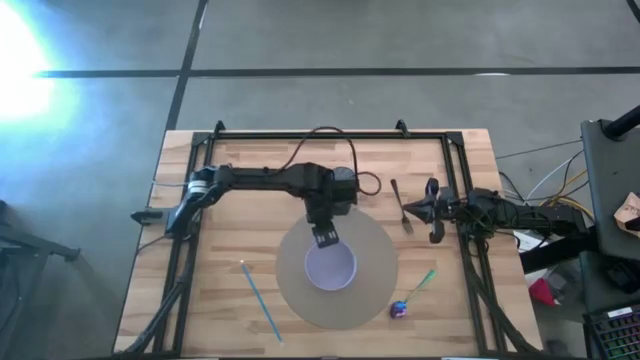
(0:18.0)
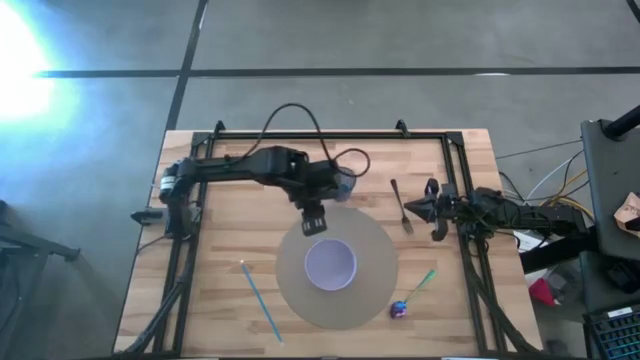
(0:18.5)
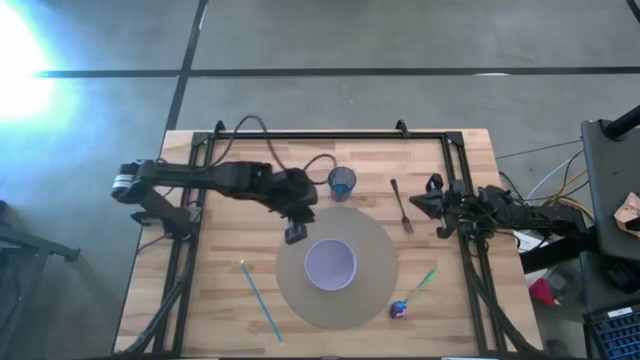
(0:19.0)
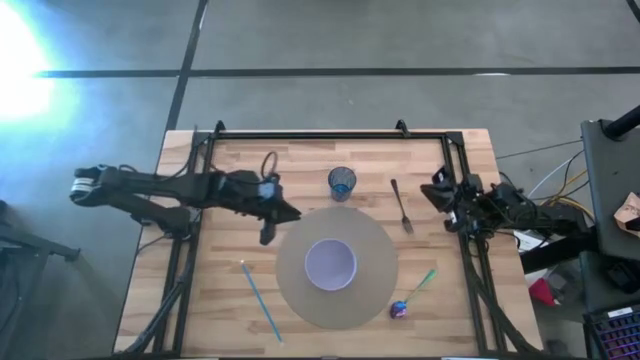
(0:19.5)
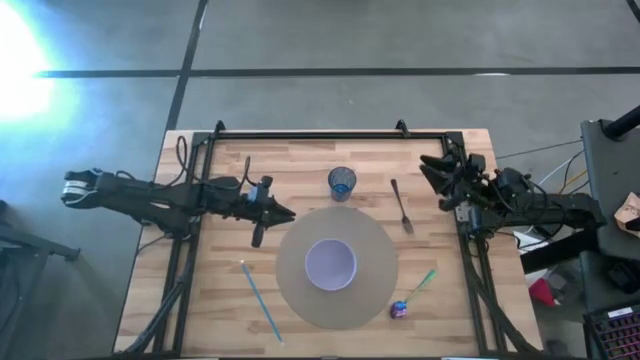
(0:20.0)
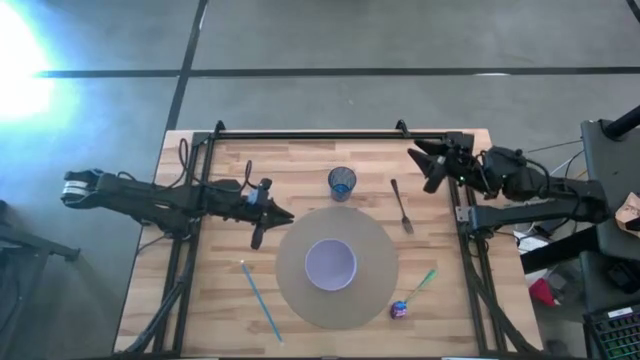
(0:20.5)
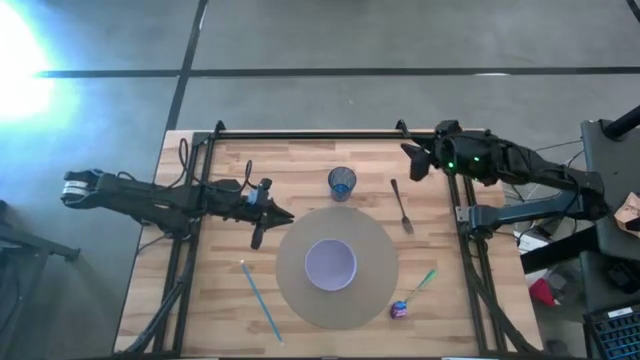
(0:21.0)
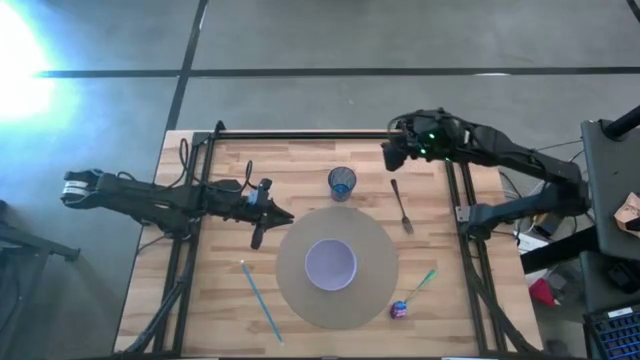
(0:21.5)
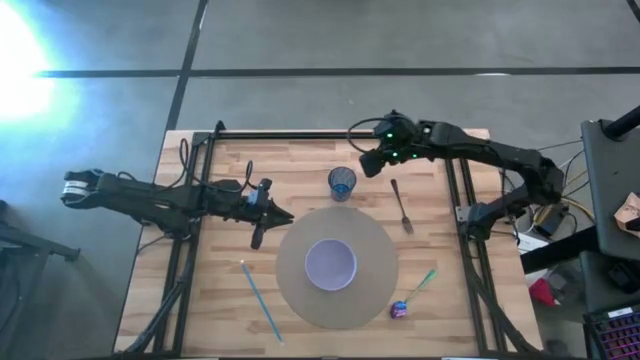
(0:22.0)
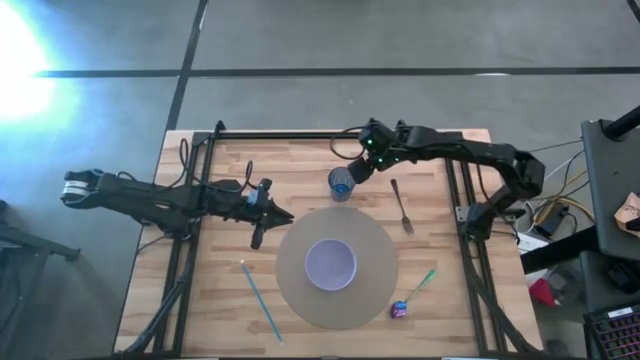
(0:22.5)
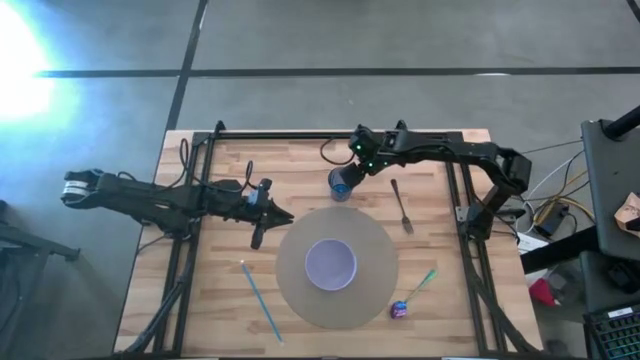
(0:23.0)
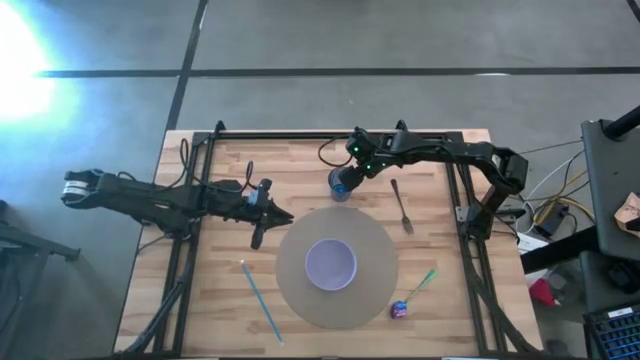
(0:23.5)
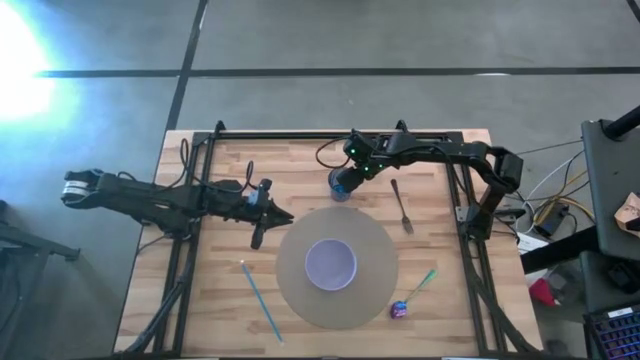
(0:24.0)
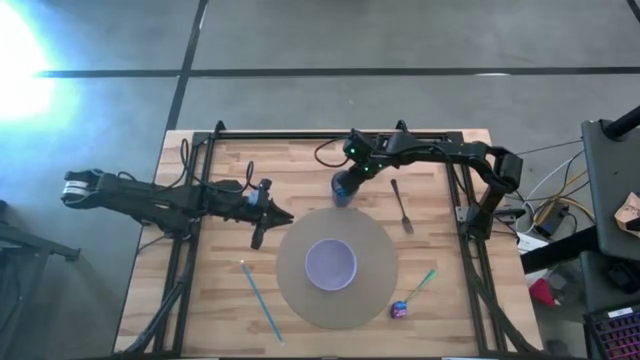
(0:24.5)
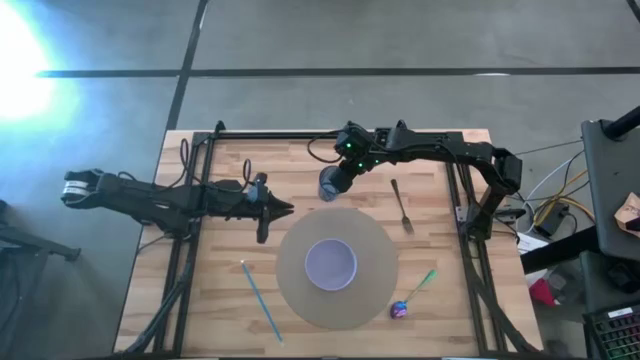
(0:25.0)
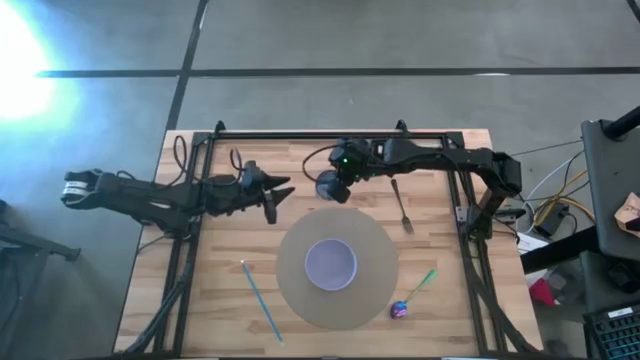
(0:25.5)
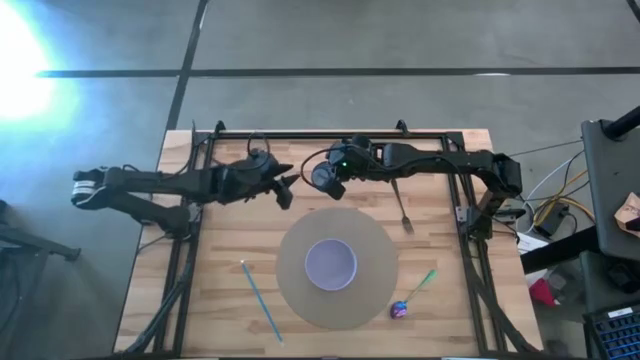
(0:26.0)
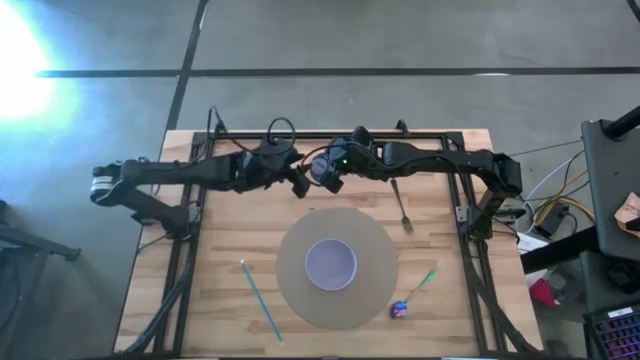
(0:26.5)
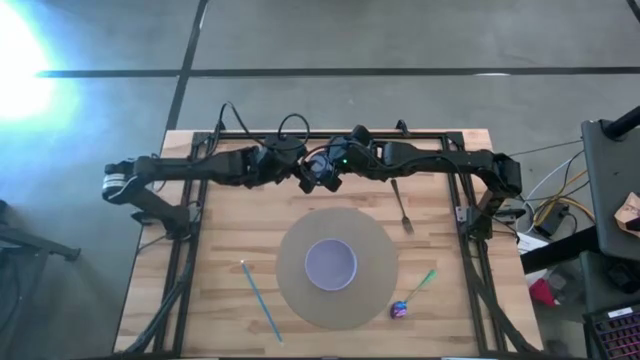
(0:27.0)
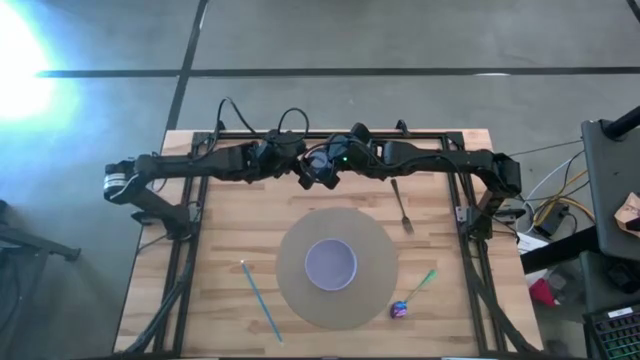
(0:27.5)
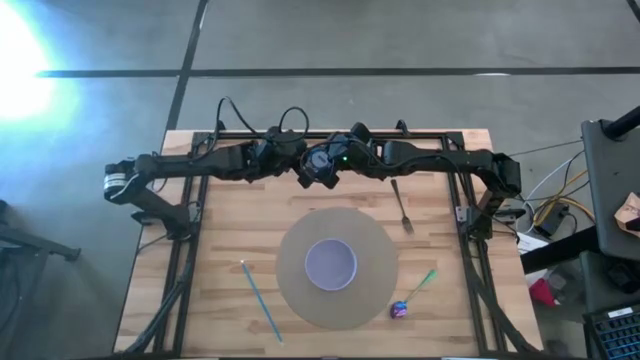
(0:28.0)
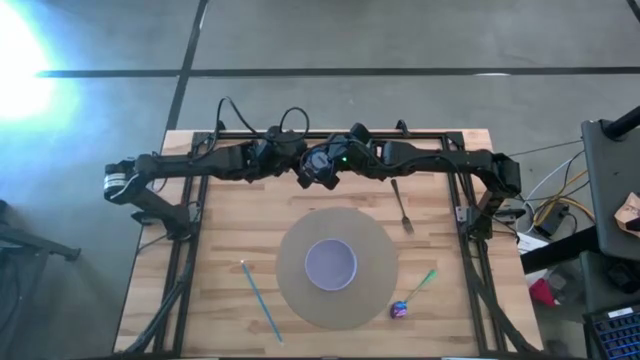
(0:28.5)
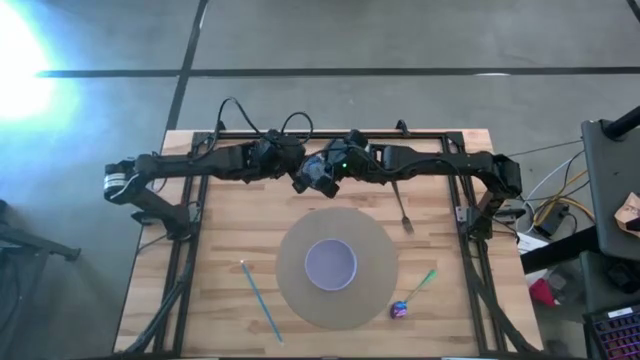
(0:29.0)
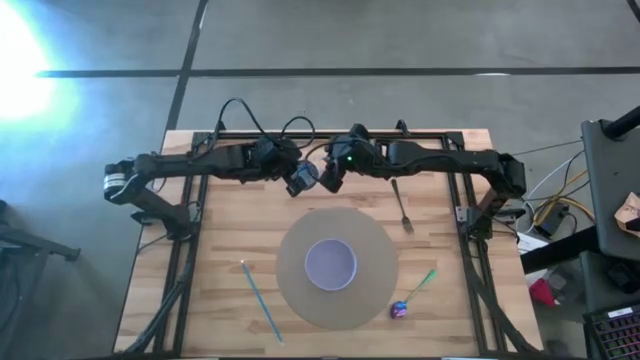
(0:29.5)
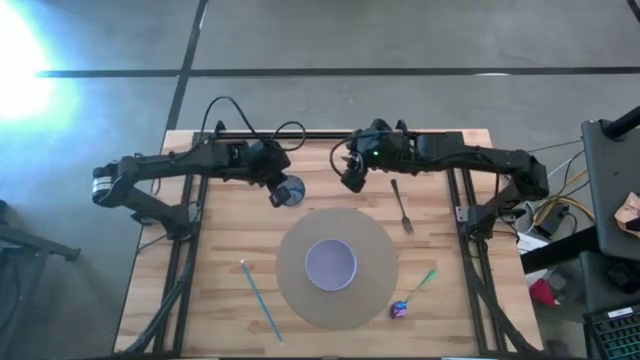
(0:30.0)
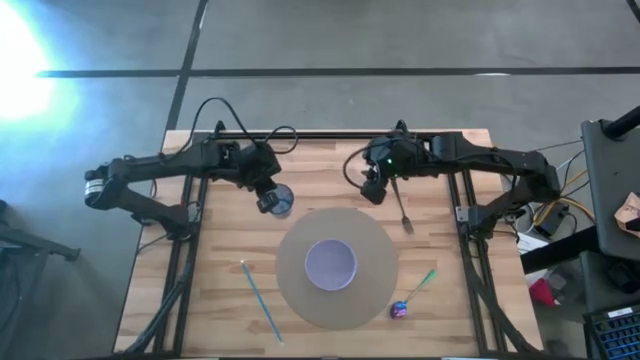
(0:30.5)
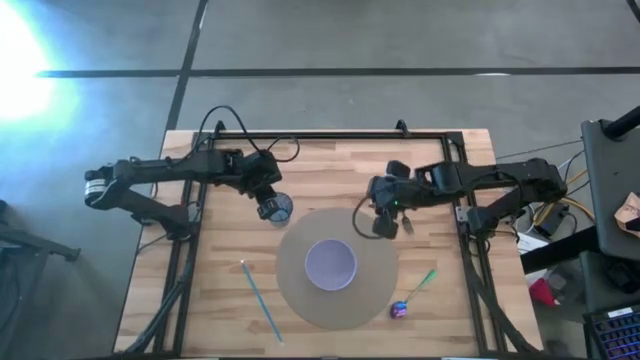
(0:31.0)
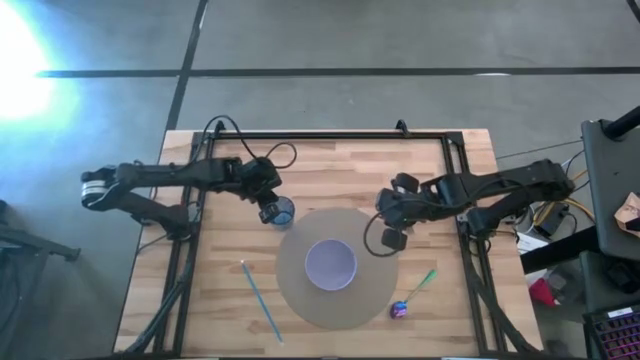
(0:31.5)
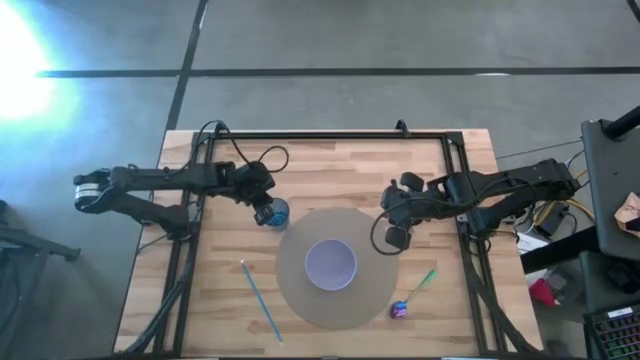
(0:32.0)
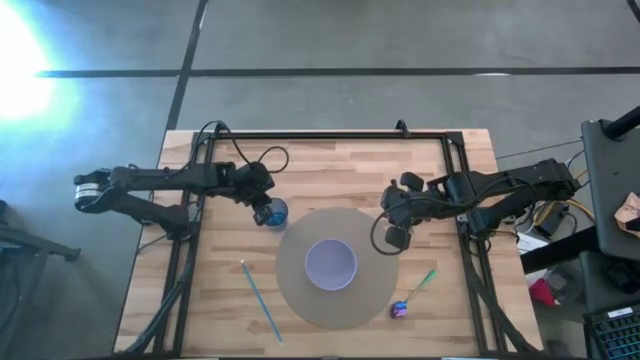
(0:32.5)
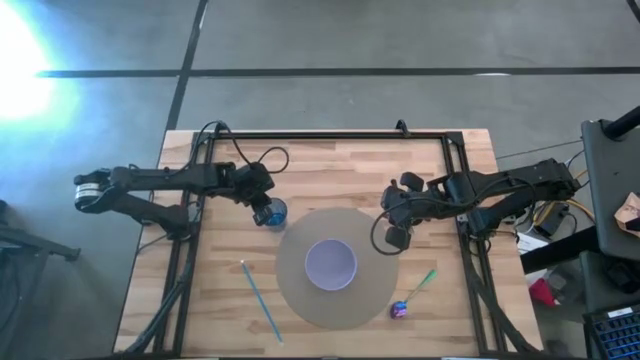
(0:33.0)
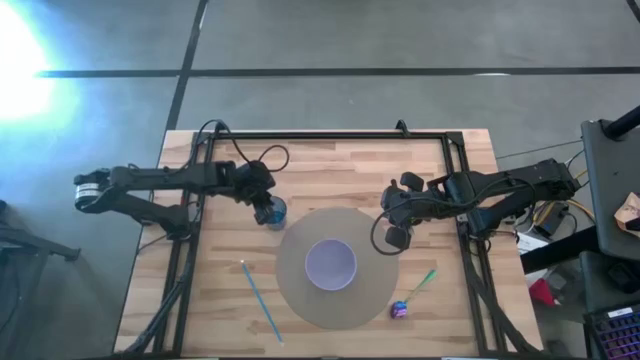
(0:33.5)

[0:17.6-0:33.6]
Task: Pick & Place Utensil
Put the blue glass at the top left of the gray mat

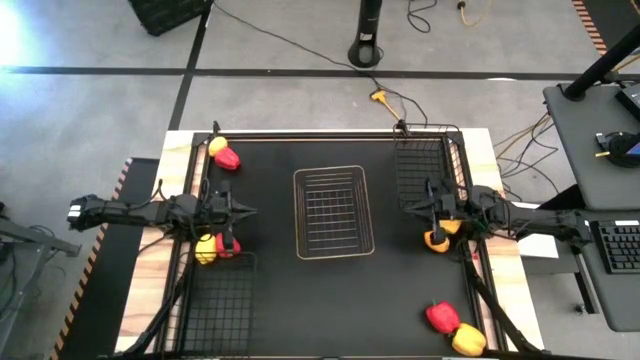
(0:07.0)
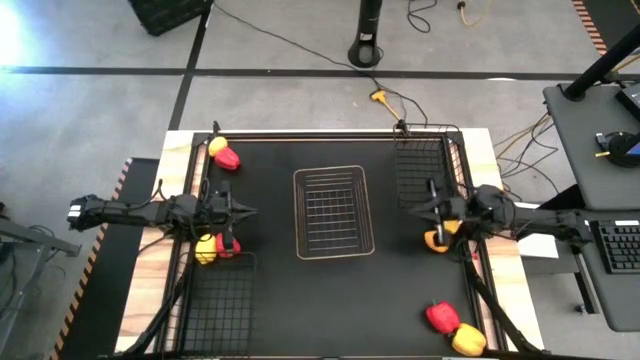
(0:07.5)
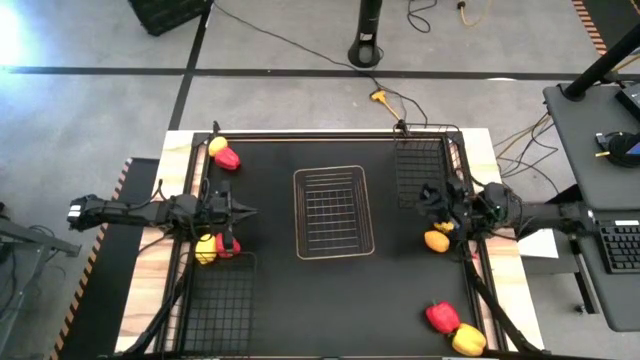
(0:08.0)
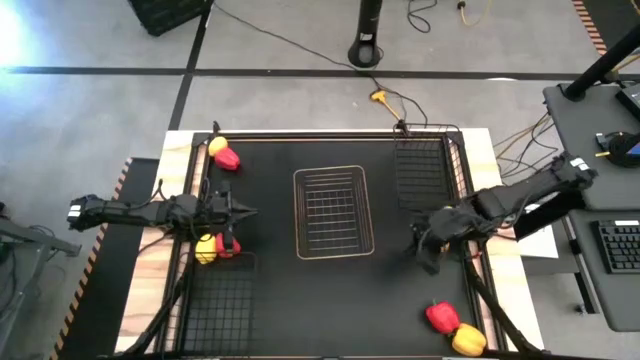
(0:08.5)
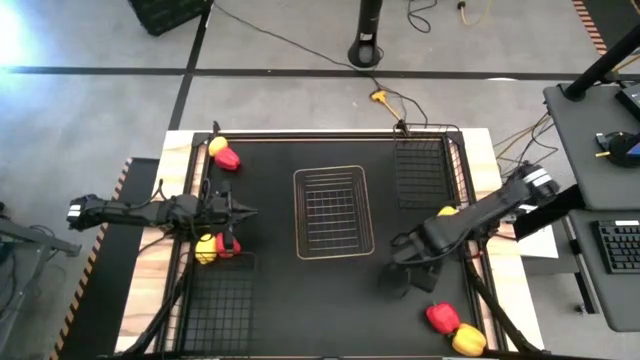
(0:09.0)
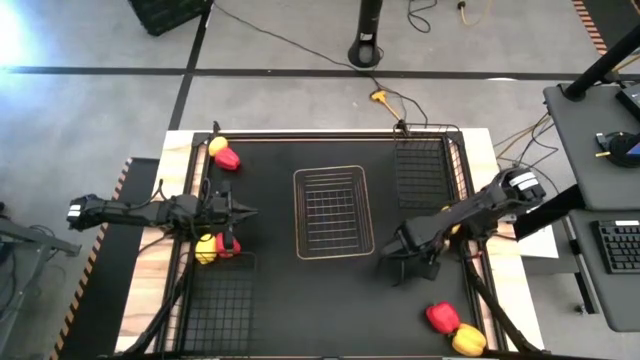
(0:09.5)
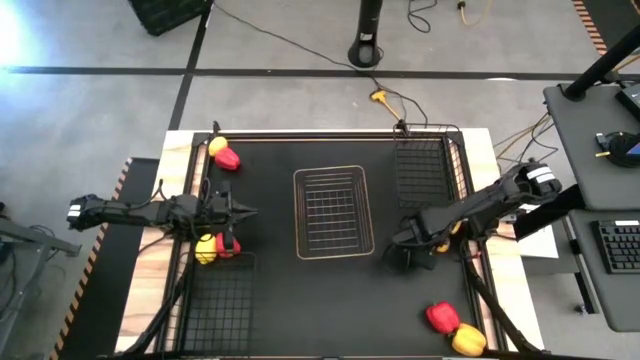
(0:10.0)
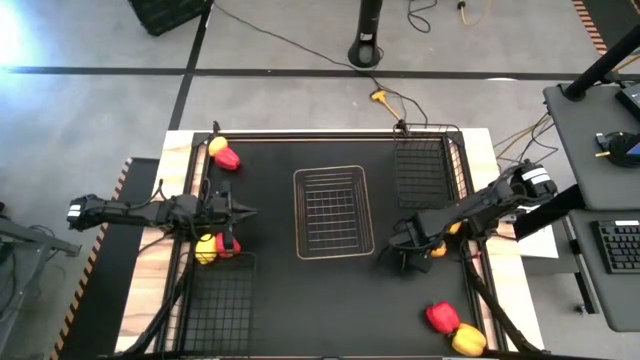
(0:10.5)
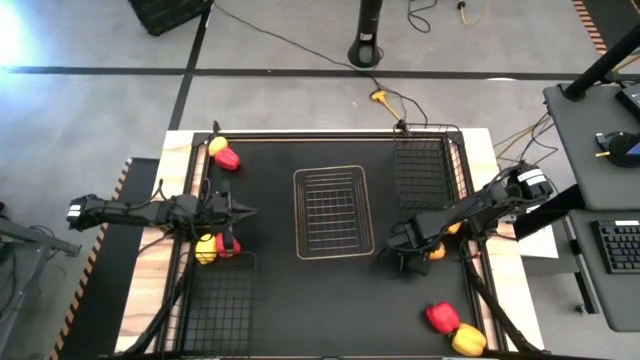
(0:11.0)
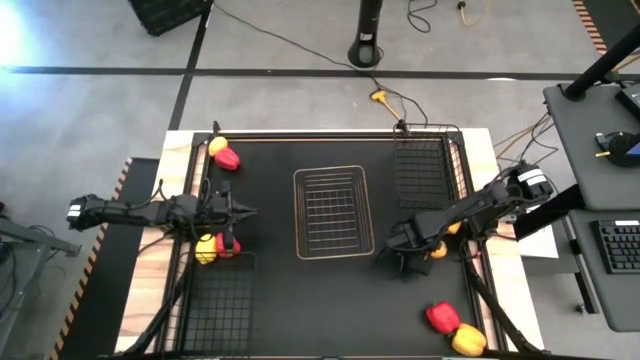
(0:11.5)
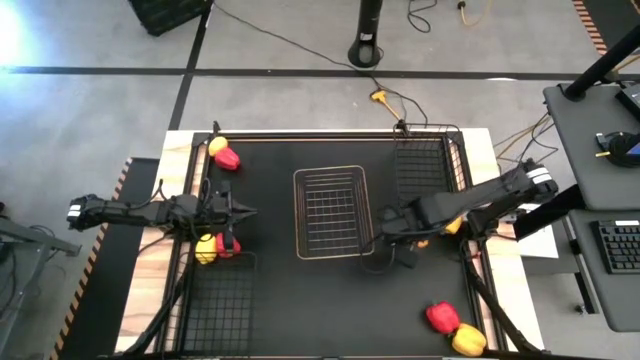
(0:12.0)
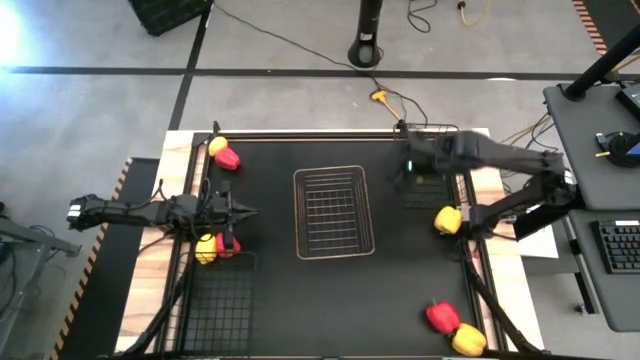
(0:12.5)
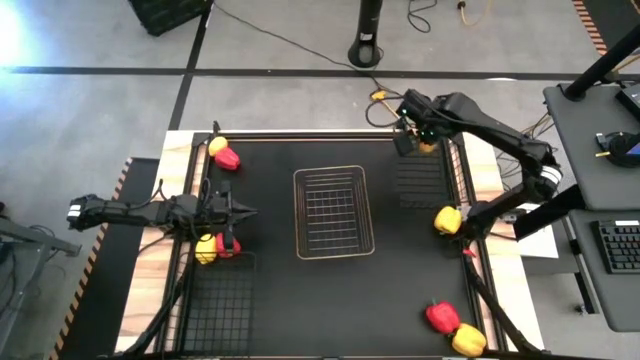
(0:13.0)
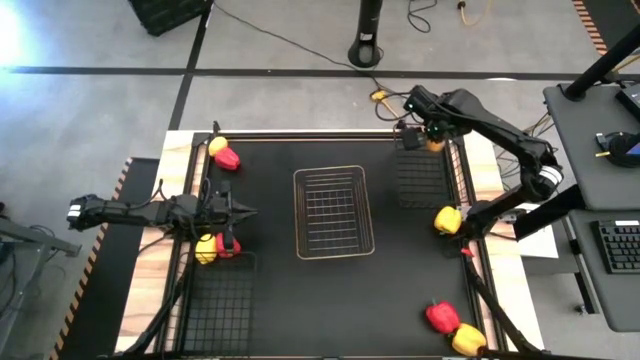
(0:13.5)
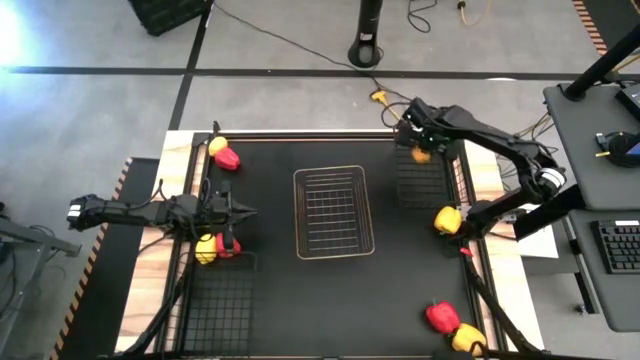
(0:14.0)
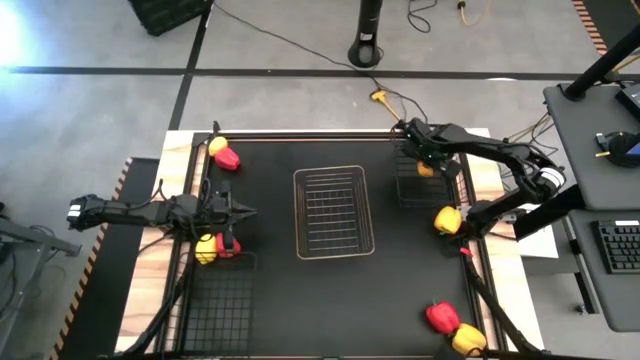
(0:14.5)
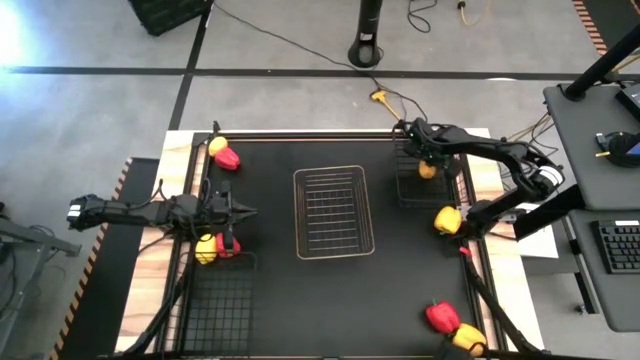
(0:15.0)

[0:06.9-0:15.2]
Task: Sort produce into baskets
Put the bottom right lemon into the top black wire basket
